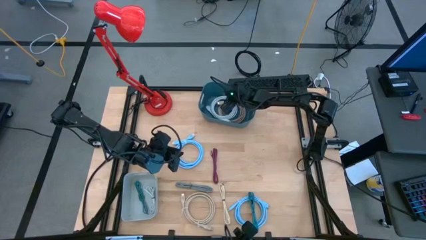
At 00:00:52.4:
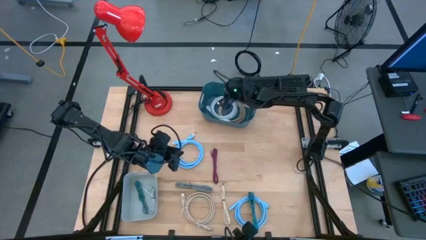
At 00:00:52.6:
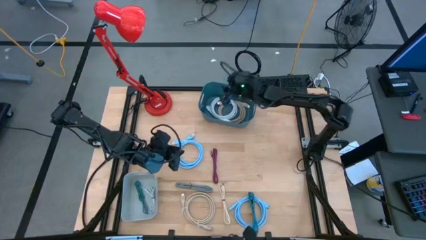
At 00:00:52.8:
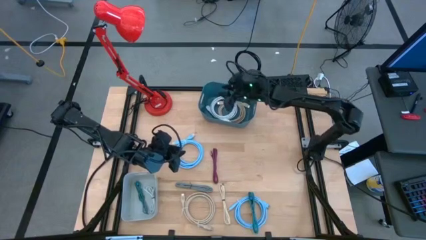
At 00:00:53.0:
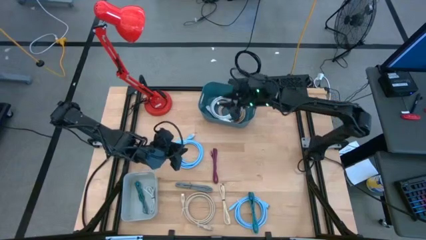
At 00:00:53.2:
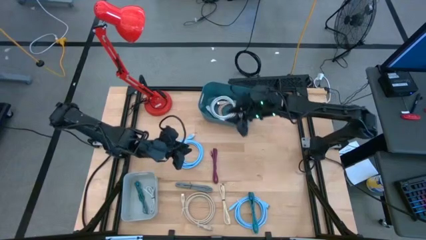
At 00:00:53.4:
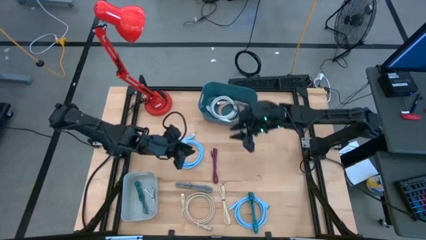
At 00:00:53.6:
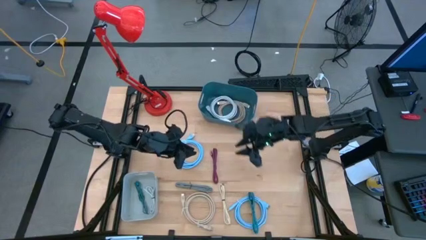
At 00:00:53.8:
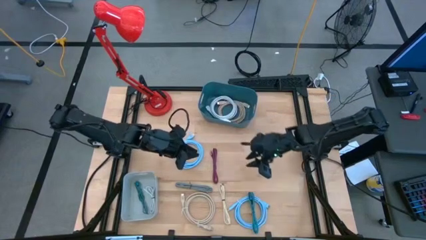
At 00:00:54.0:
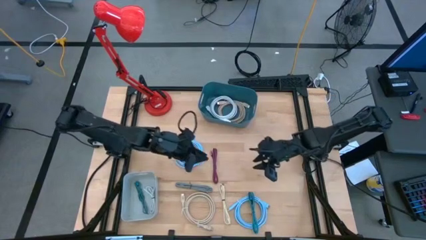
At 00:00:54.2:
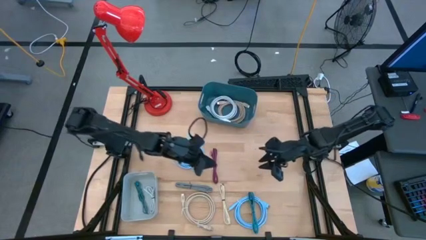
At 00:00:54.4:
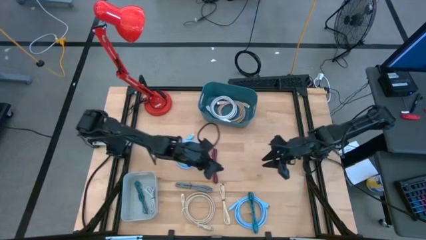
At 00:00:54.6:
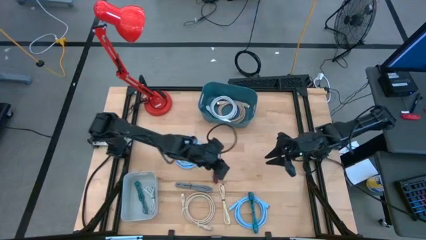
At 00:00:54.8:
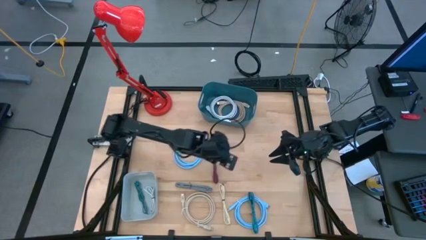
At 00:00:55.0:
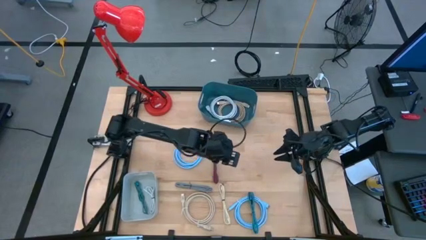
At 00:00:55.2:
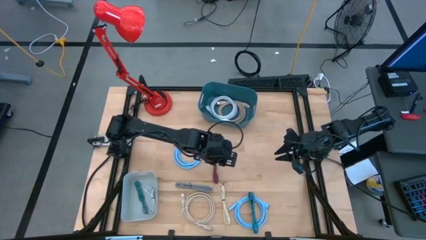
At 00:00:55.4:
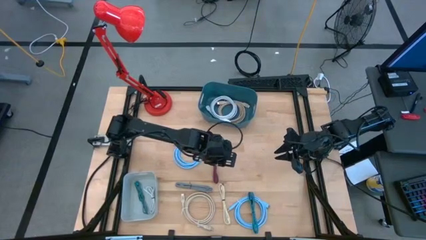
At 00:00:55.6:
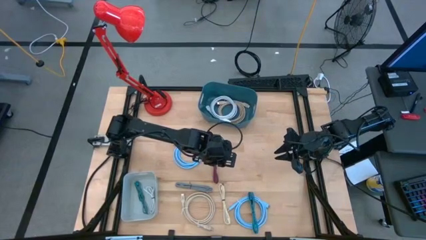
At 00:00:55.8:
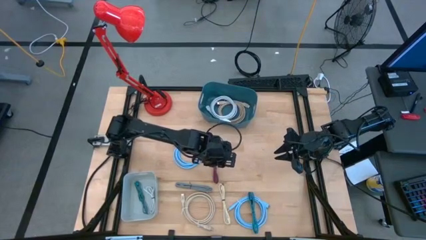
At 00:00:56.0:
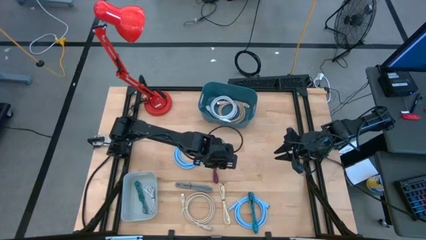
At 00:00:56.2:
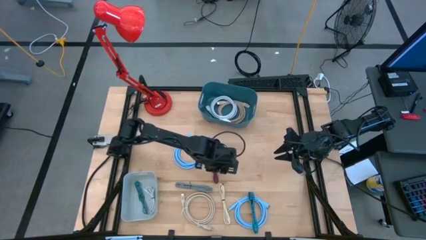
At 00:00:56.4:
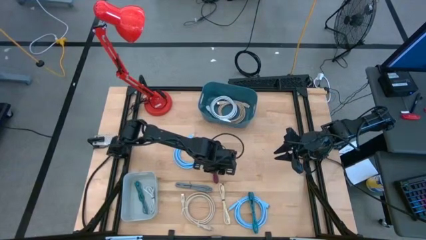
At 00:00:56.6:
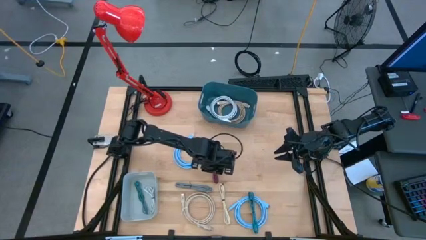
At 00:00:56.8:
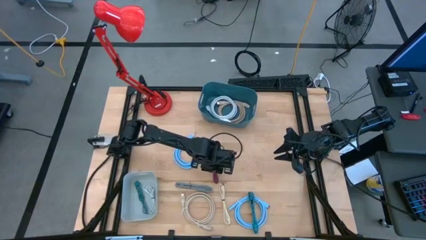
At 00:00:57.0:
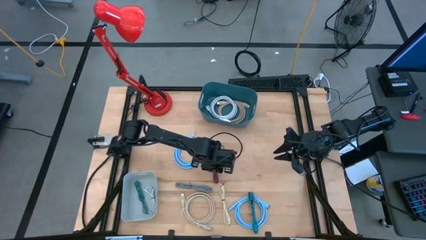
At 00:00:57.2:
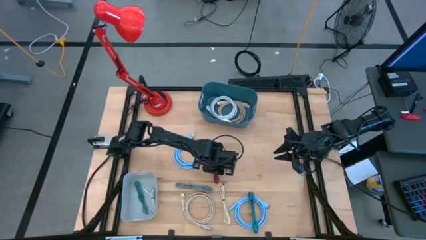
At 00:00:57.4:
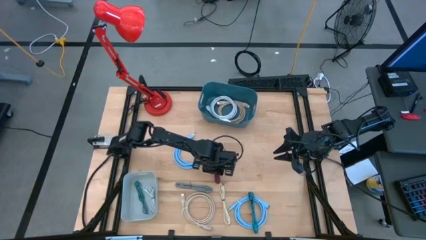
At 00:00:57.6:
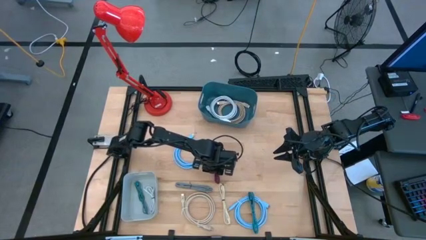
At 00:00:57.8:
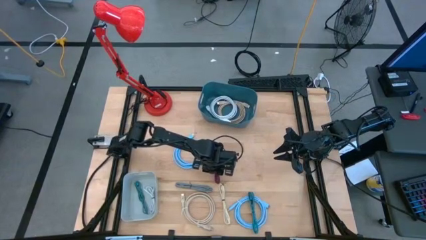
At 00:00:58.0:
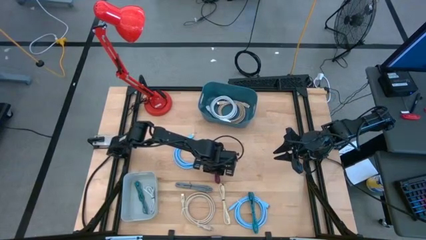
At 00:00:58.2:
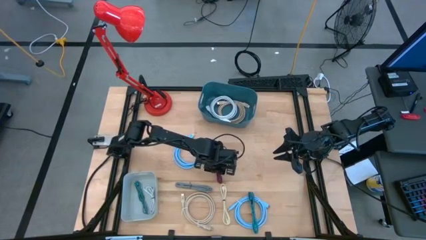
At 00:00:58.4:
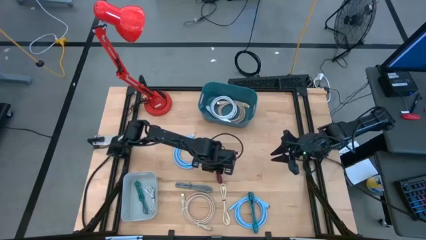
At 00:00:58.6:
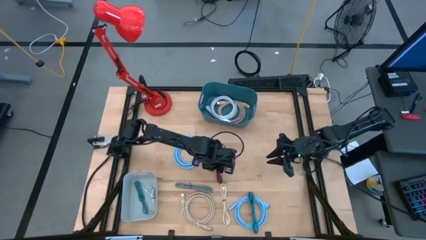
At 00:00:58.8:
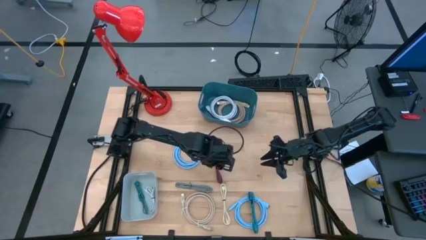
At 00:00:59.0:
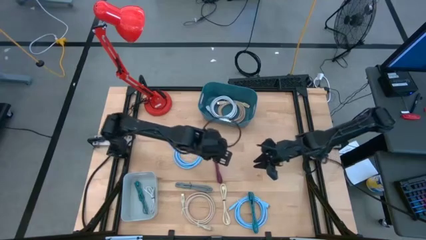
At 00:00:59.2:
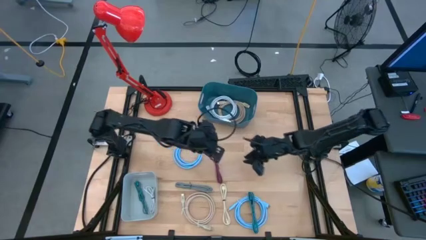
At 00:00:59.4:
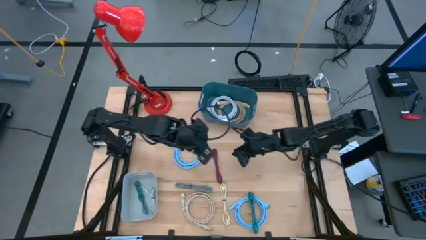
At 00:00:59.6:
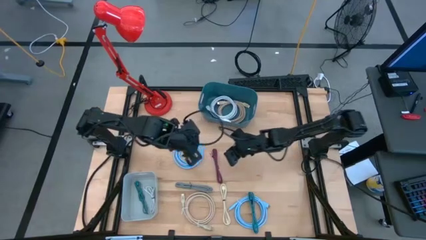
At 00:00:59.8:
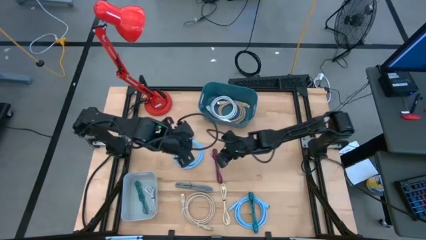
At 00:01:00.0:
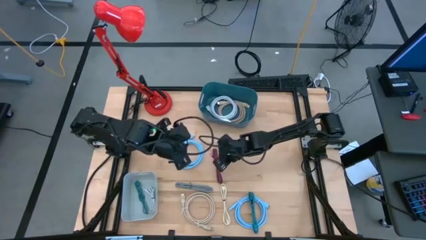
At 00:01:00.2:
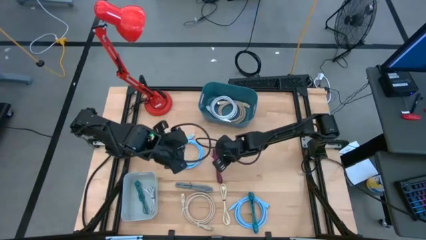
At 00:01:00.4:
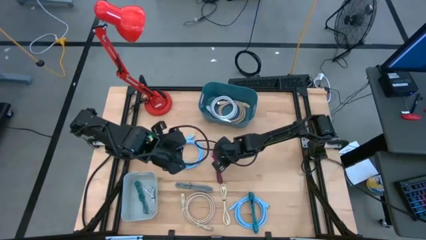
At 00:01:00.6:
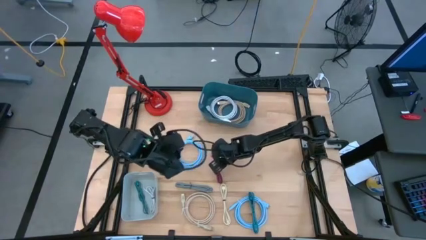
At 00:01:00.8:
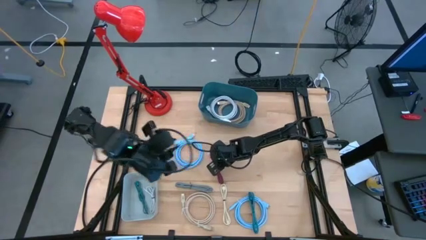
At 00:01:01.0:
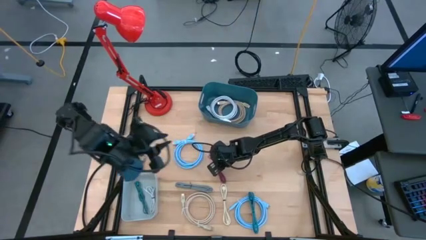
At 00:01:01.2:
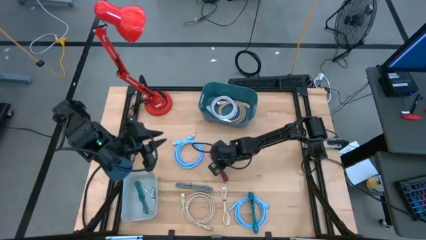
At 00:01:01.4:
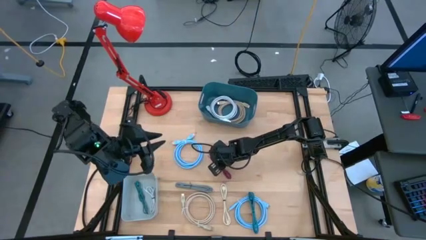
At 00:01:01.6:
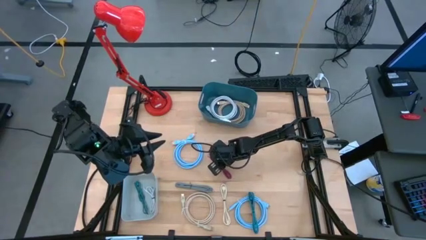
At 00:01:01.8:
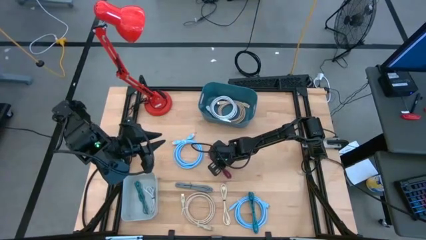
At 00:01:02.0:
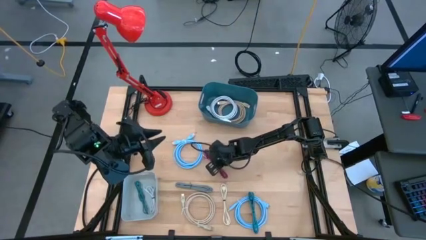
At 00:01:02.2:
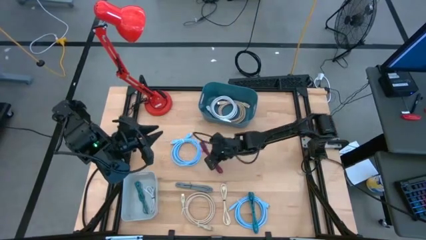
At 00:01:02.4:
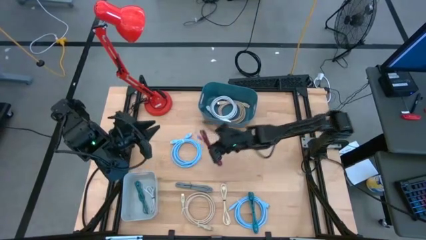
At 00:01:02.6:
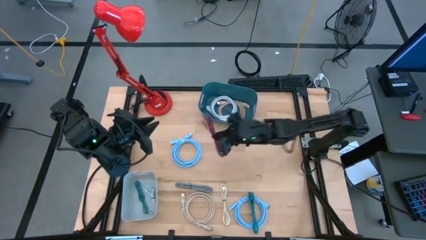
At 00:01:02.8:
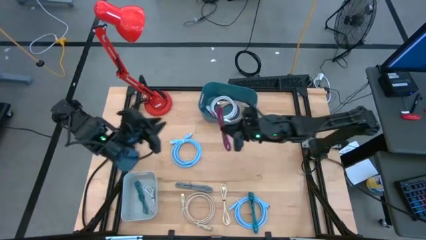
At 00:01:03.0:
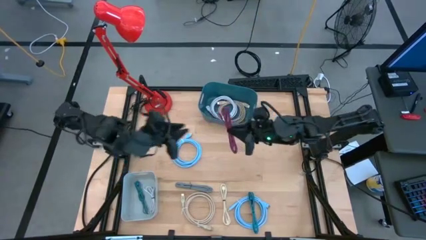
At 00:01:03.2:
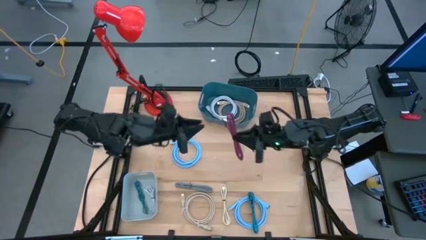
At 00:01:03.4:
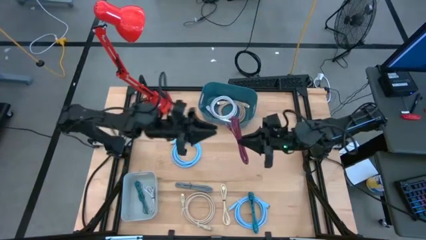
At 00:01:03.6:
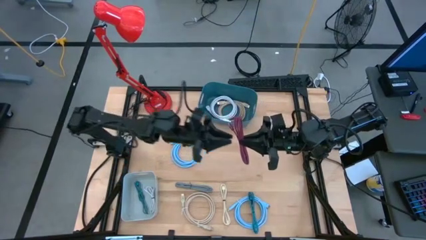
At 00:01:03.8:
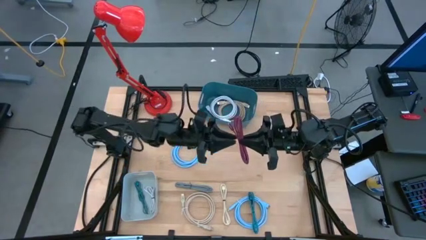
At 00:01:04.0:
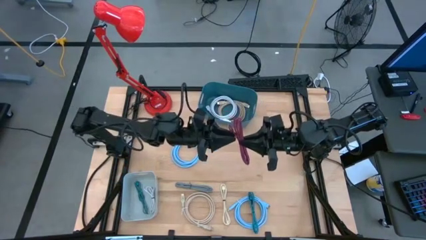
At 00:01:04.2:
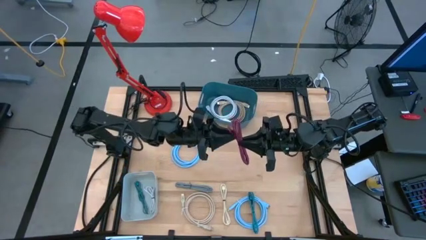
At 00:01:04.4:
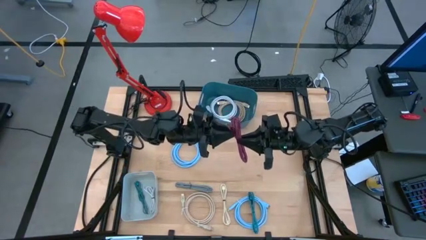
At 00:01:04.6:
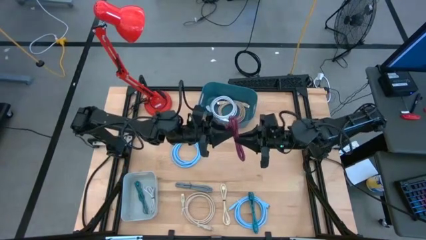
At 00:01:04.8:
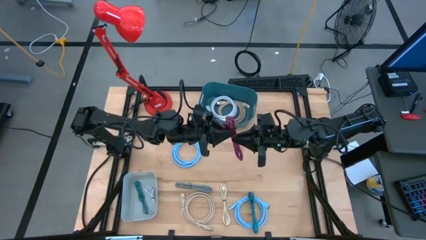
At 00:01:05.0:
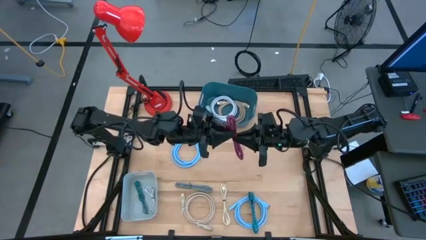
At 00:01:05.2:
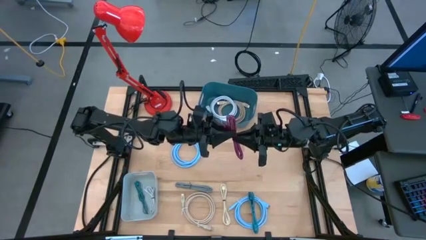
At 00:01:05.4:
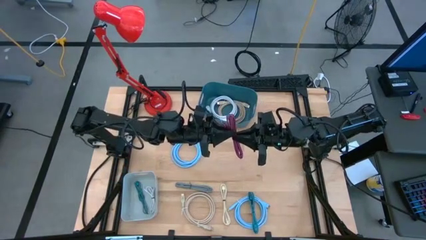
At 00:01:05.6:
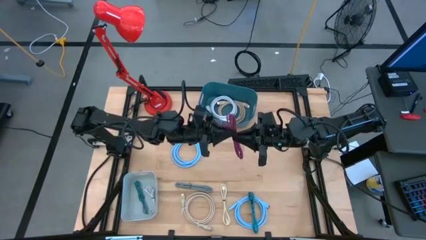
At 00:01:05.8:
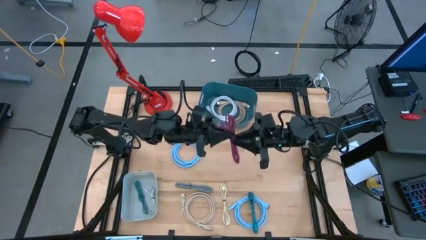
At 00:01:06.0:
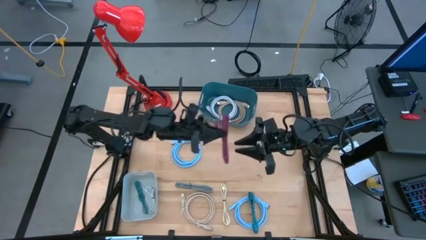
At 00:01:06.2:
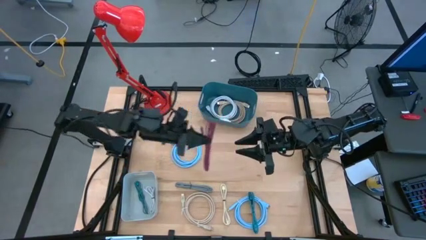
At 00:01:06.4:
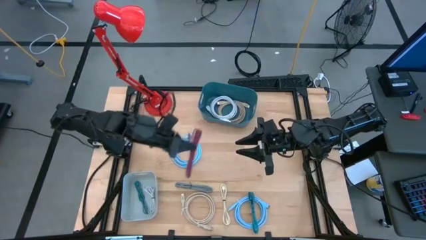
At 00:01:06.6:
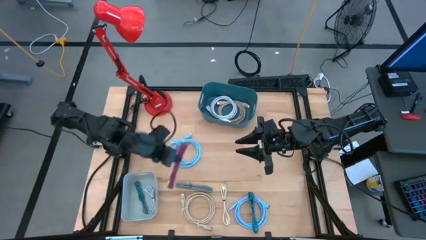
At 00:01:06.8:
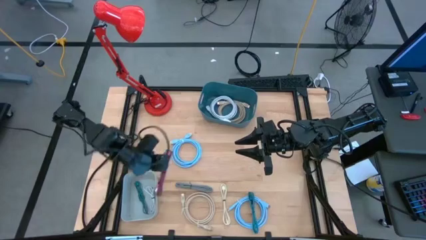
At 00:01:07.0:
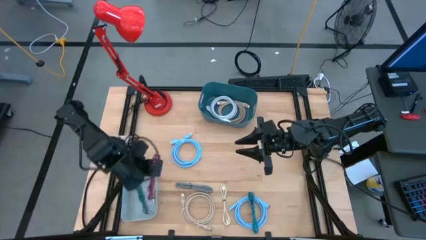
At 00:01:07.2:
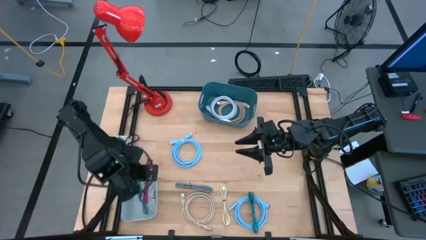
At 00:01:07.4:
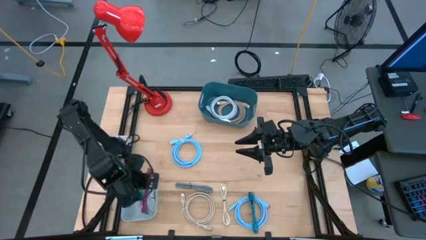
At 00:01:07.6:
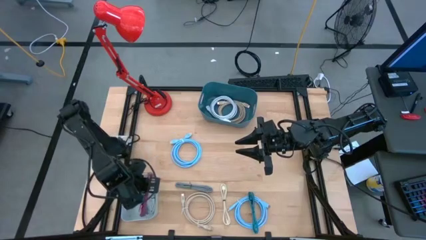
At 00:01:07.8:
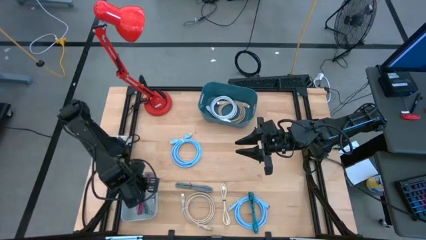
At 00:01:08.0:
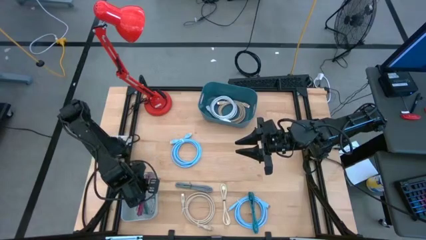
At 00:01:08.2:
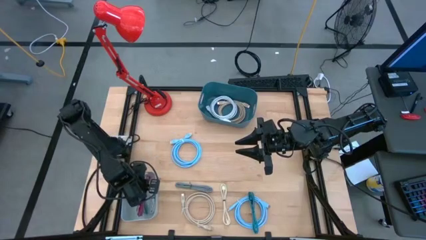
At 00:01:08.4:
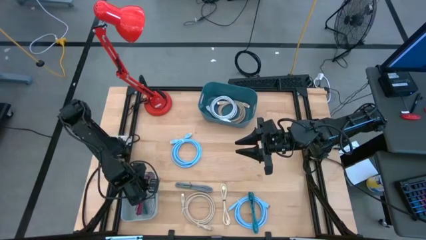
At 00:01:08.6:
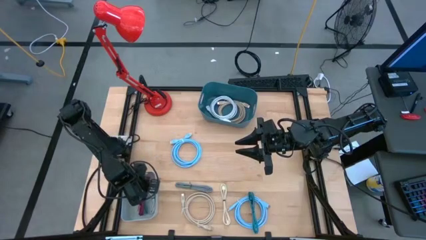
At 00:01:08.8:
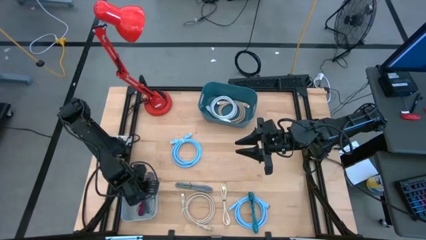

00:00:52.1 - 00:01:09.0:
Task: Pick & Place USB Port
Put the red charger cable into the gray bin
